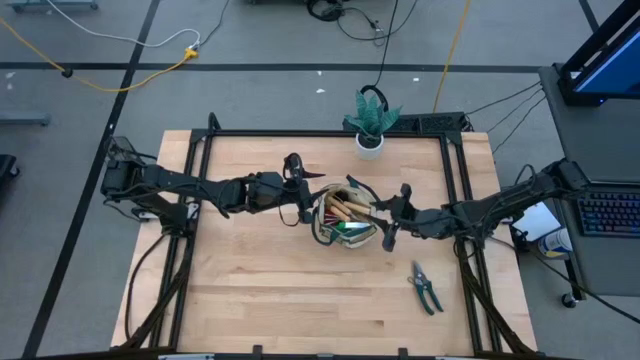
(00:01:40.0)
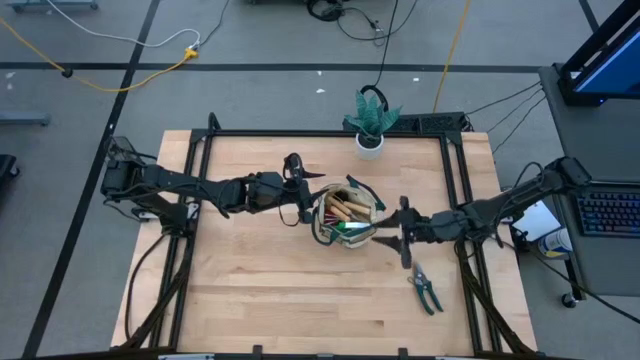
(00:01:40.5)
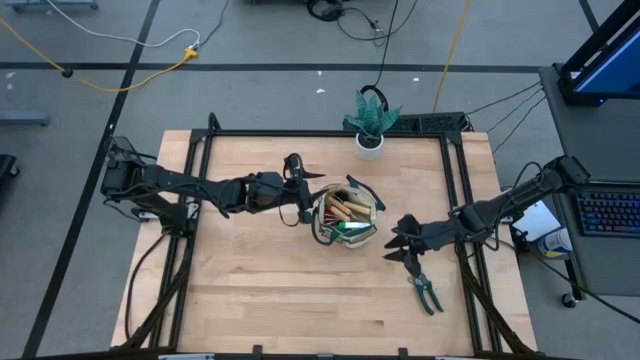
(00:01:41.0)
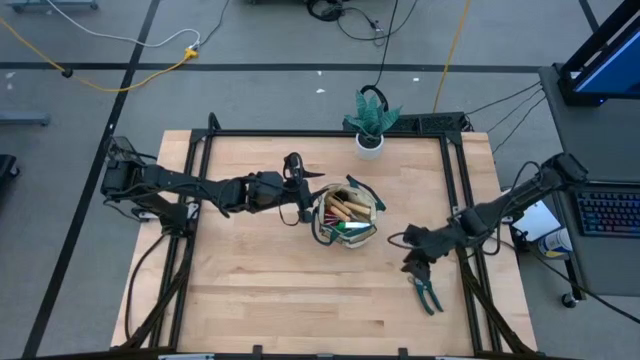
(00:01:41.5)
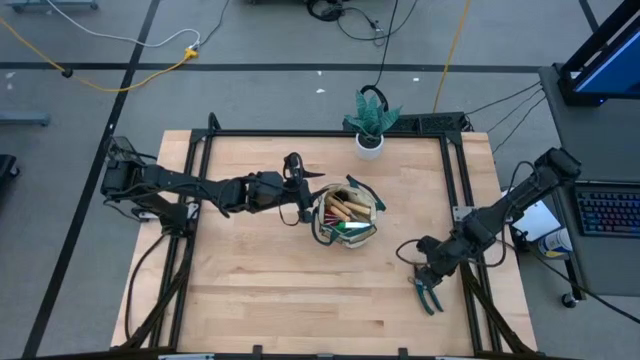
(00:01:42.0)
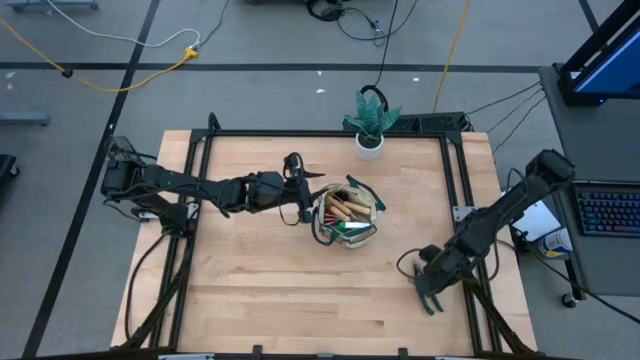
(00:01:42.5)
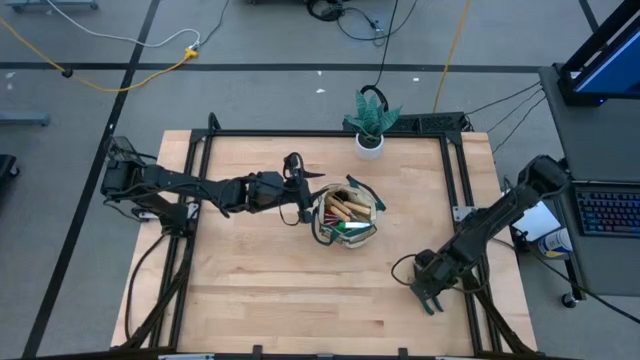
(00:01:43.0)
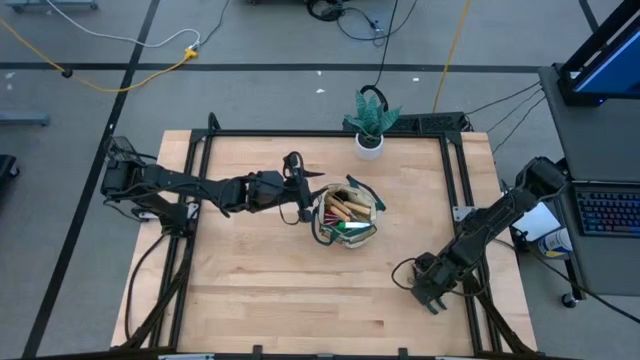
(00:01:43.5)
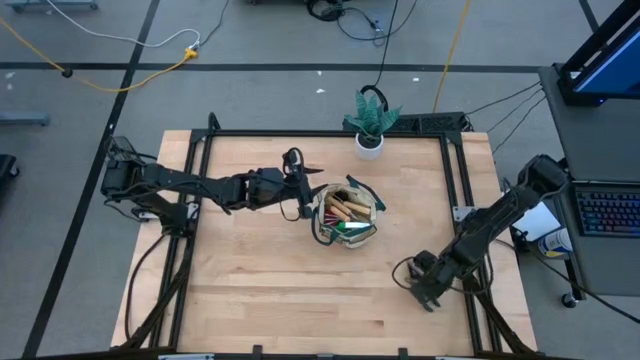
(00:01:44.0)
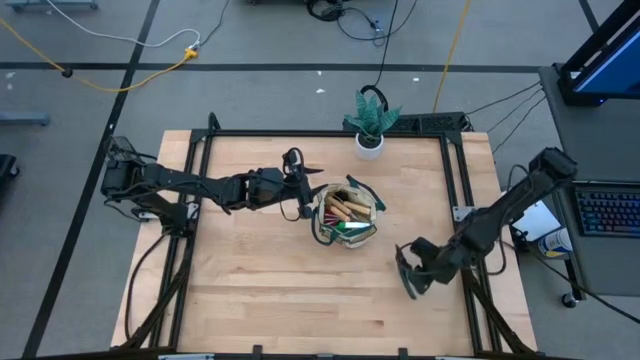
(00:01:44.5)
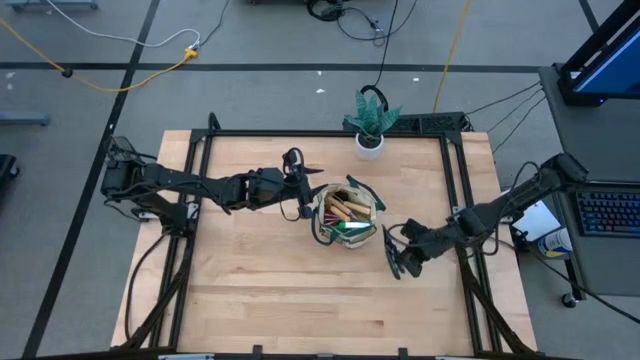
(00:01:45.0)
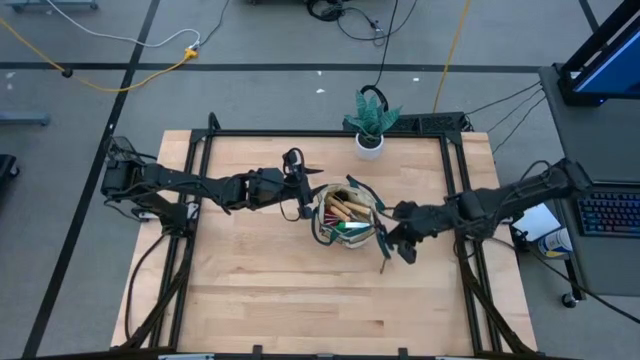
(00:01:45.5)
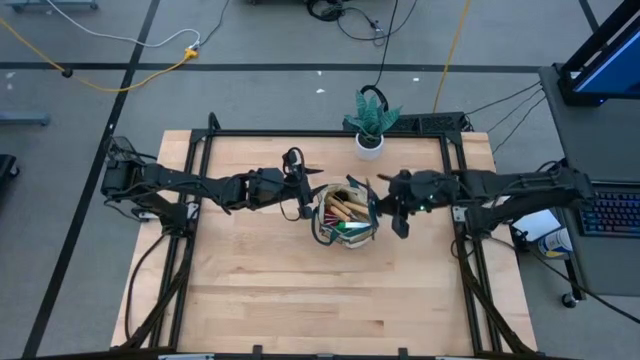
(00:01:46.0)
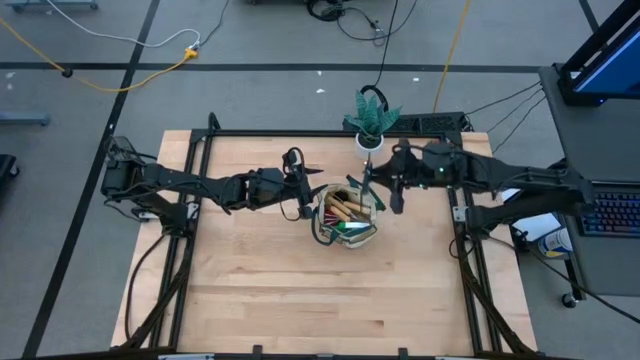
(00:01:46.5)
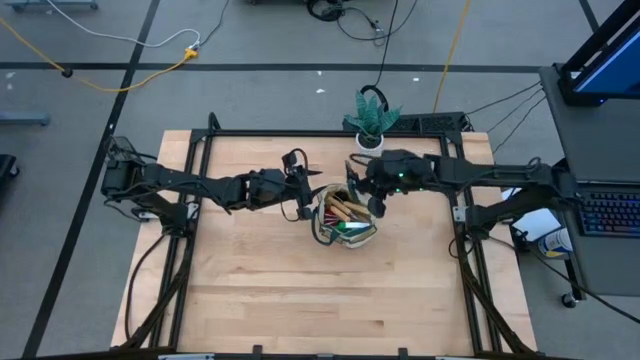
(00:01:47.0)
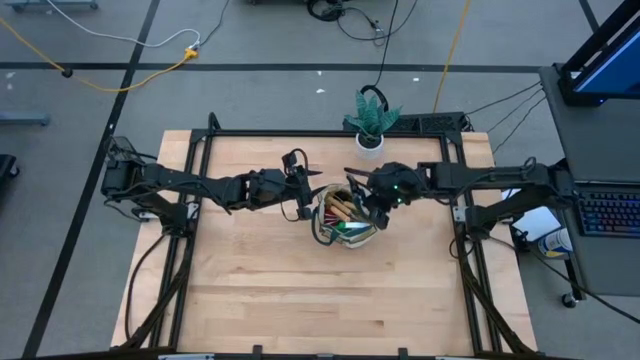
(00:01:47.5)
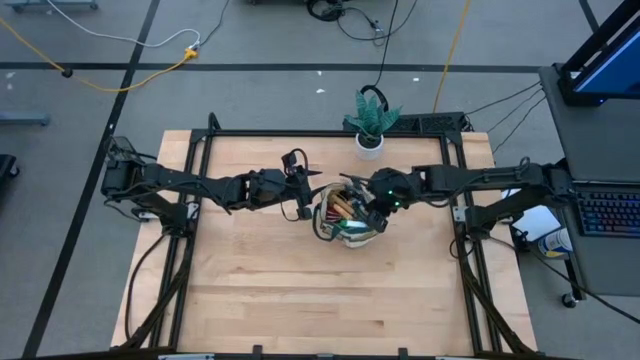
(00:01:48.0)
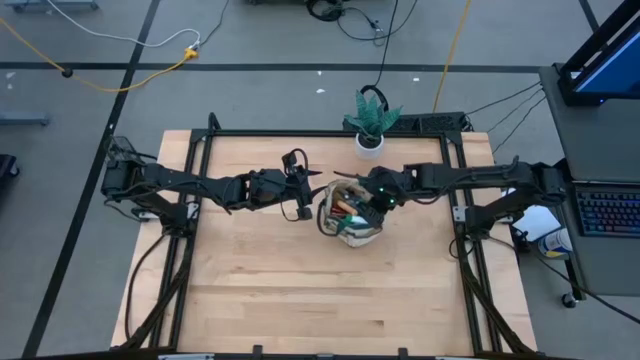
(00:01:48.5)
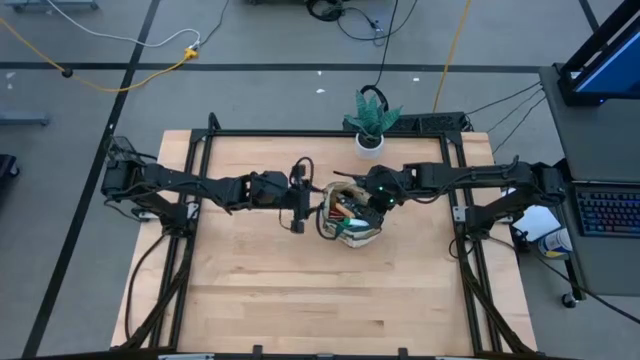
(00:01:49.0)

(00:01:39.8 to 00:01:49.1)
Task: Pick & Place Garden tools in Gardening bag
Put the green shear scissors into the gardening bag

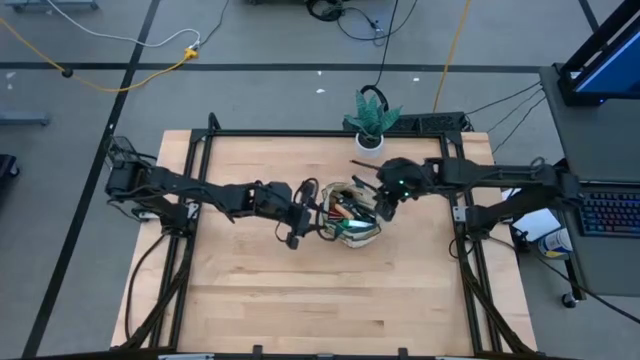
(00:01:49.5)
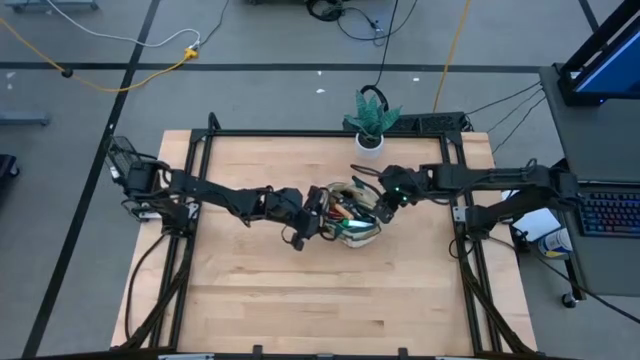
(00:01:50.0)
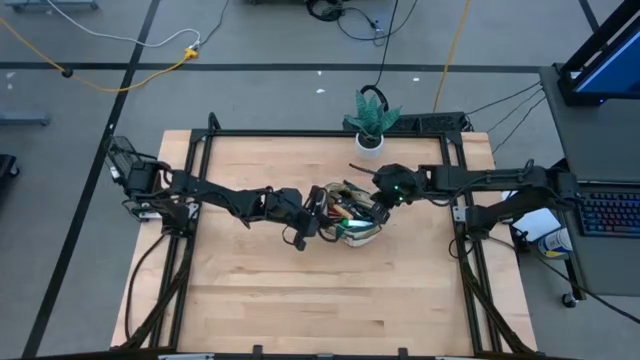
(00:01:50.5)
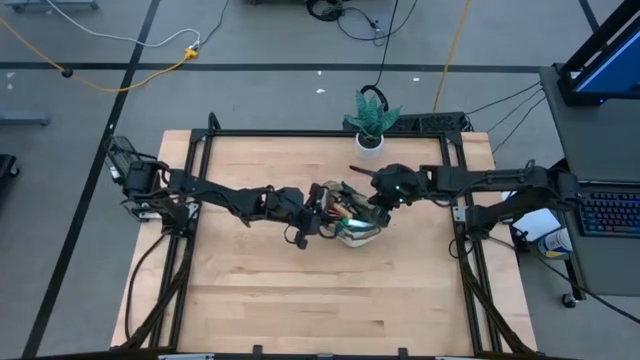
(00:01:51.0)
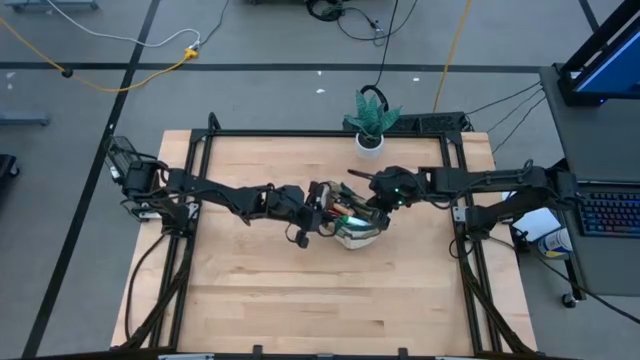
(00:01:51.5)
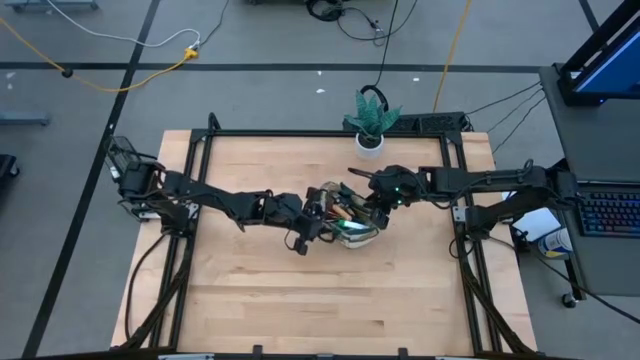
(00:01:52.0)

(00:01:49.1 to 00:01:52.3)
Adjust the gardening bag

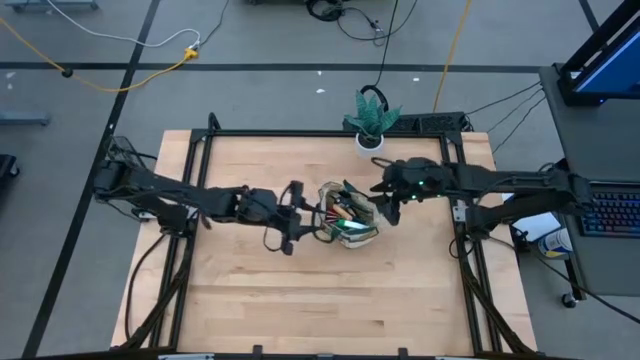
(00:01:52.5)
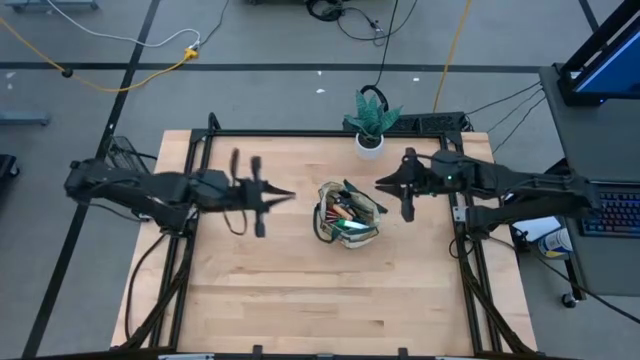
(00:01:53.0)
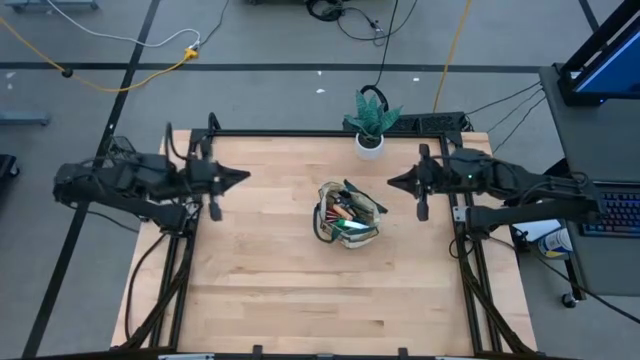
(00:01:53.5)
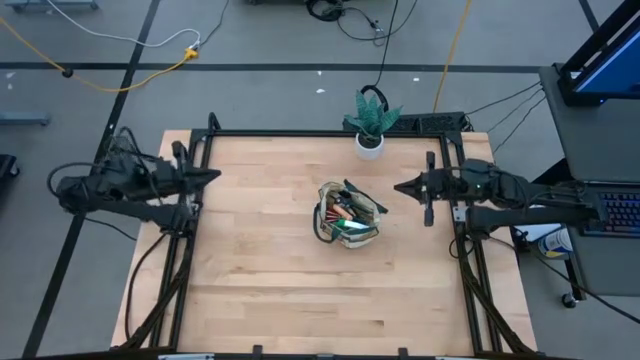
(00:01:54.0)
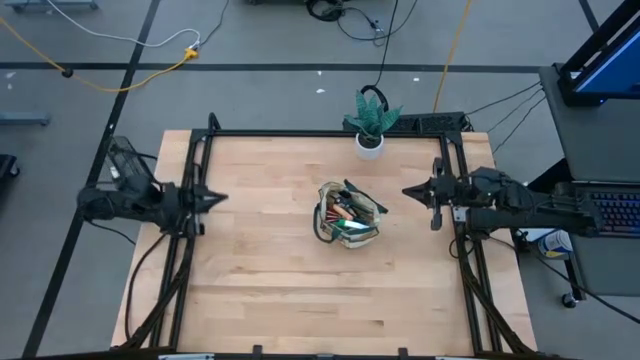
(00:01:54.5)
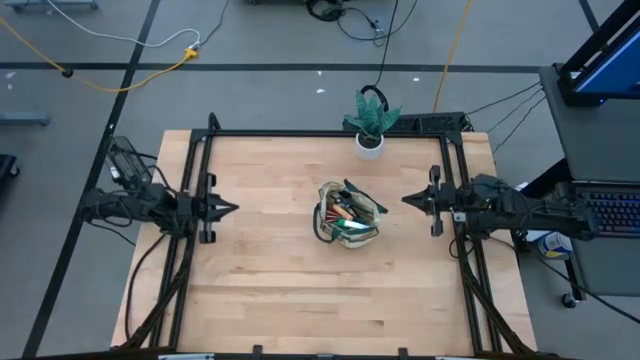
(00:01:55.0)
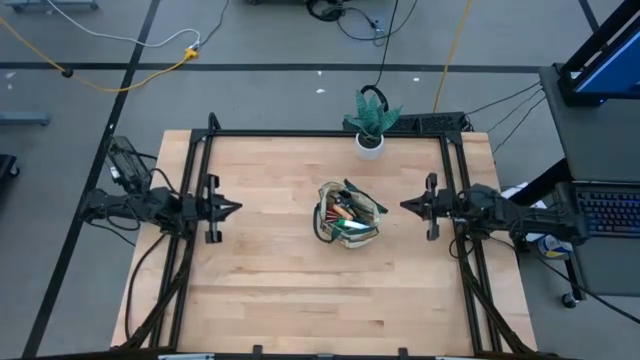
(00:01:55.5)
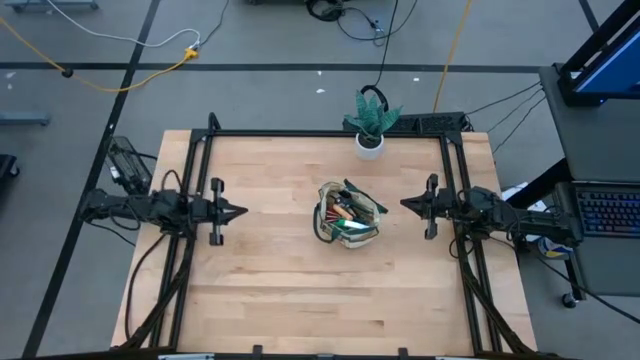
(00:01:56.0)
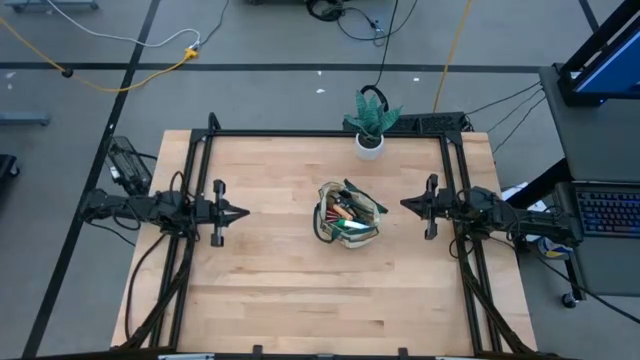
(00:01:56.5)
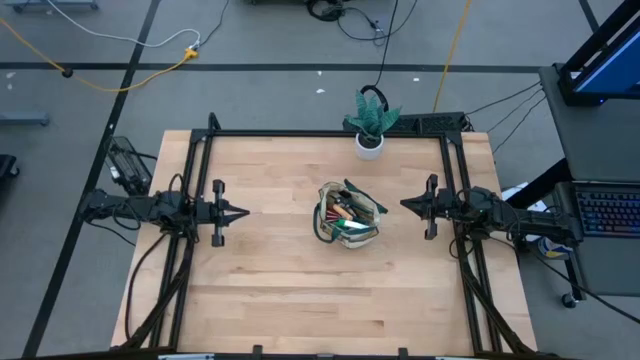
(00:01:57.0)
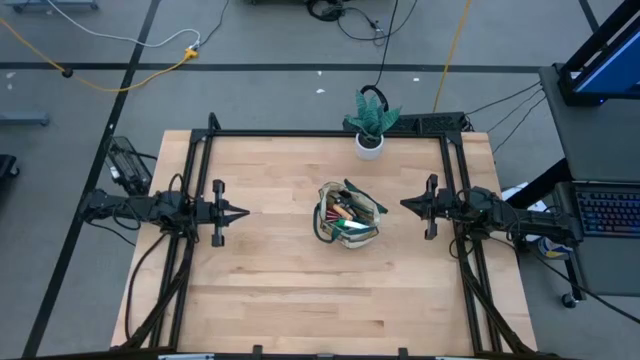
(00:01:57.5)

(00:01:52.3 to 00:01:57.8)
Return to Home Position

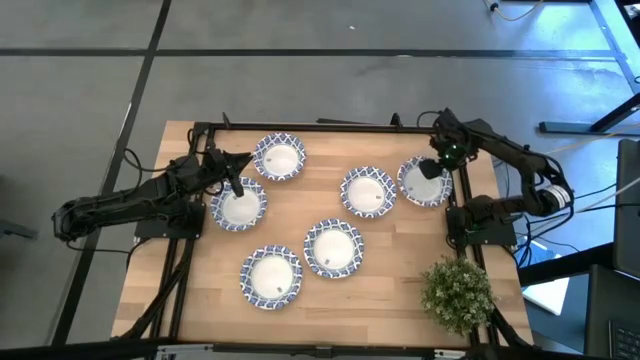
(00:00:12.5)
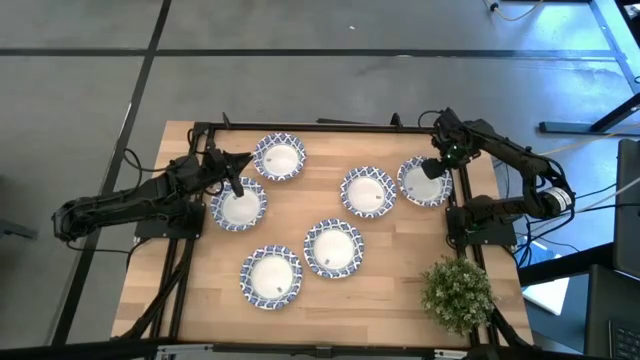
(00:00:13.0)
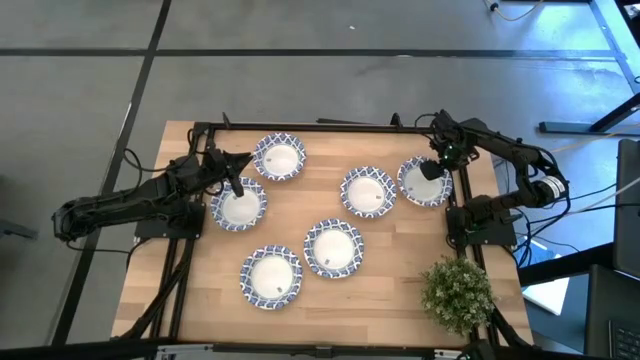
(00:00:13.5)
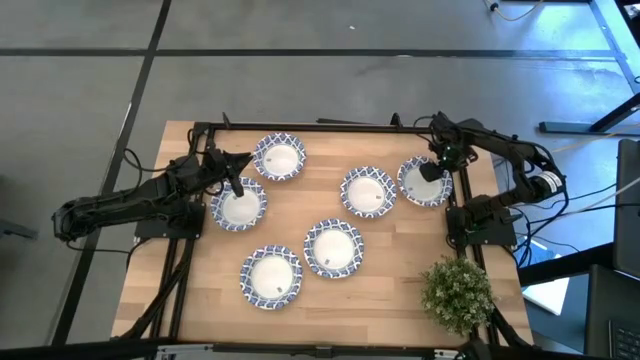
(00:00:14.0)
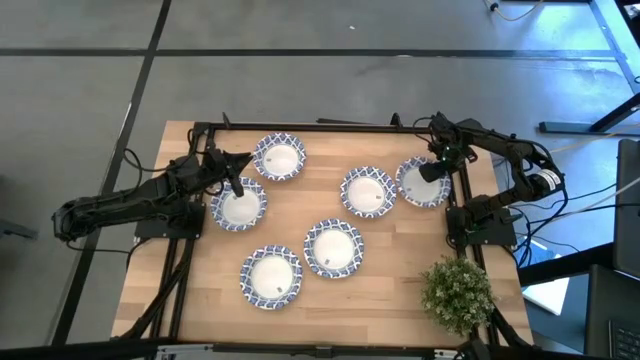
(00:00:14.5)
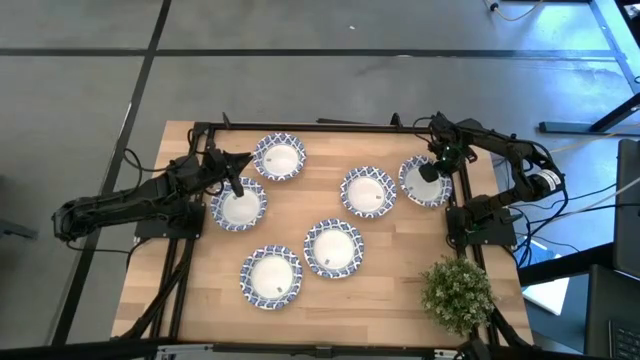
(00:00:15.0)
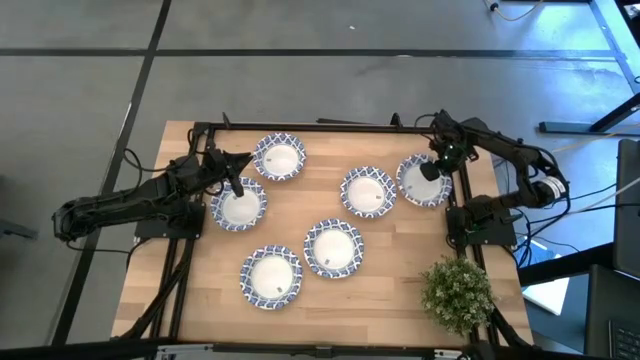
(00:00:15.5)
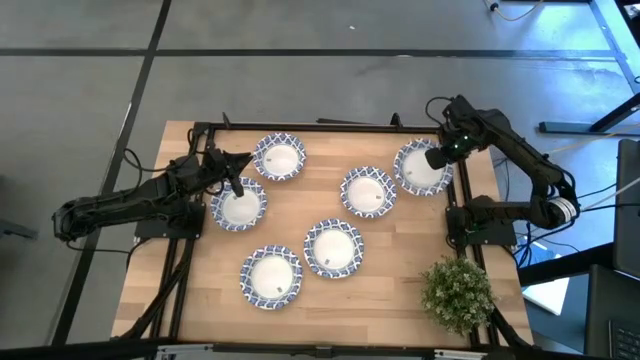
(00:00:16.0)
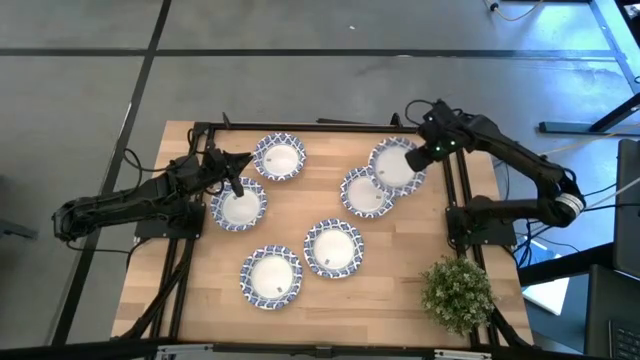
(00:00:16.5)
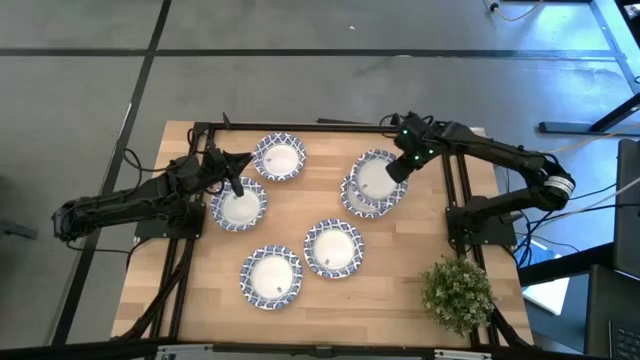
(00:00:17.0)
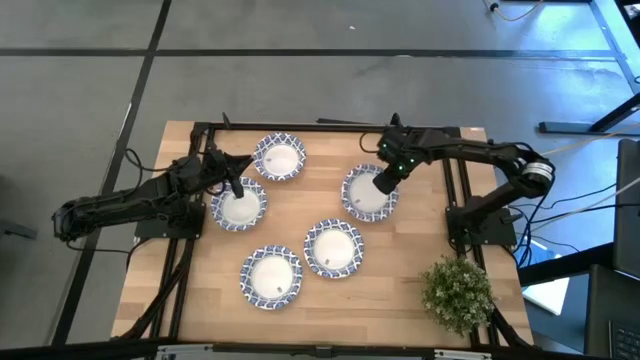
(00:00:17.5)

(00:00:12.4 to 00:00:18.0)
Task: Nest bowls inside each other
Stack the blue bowl on the blue bowl
